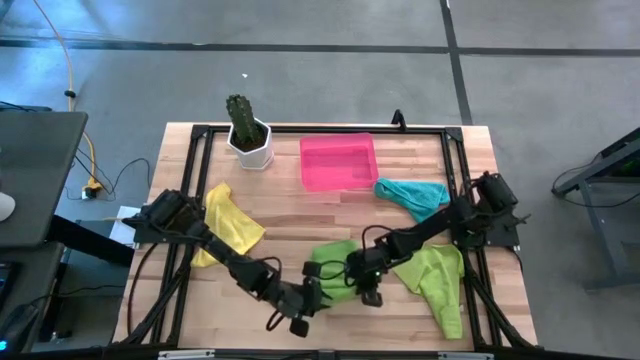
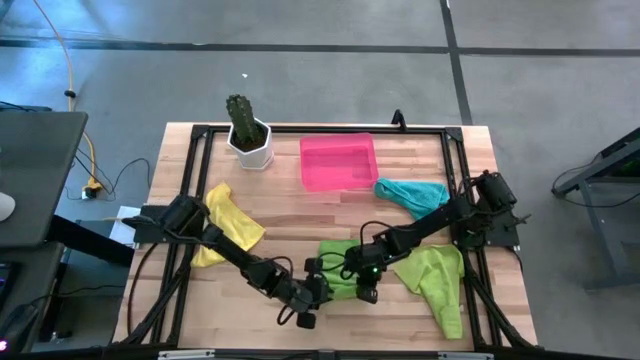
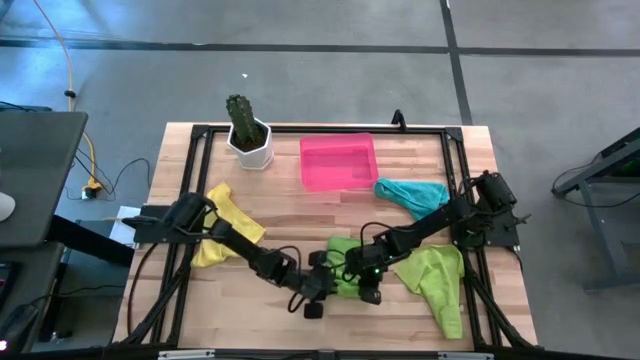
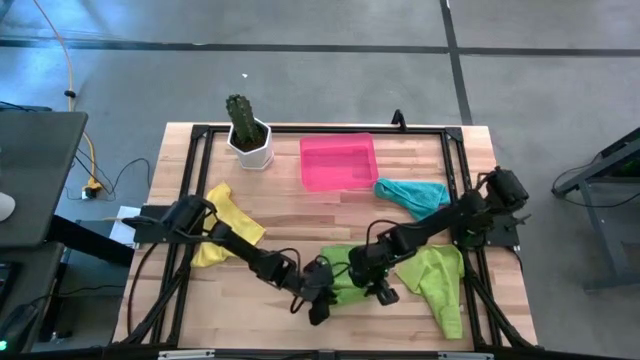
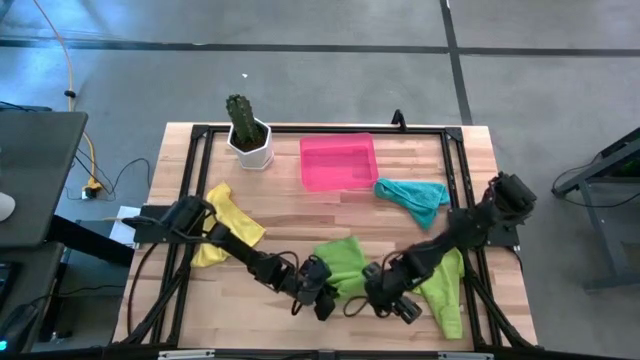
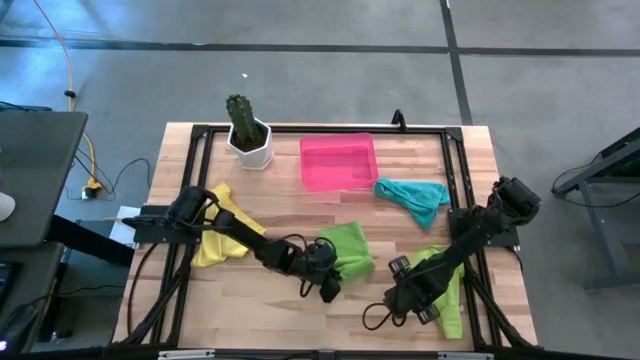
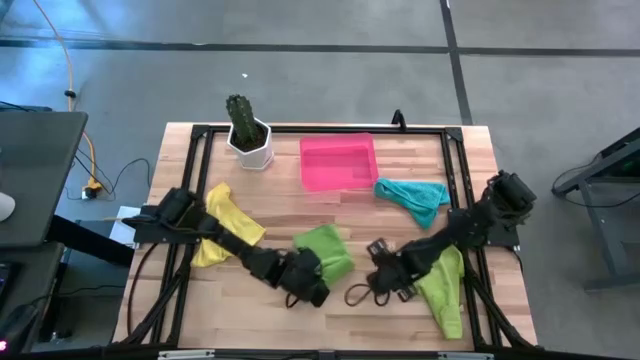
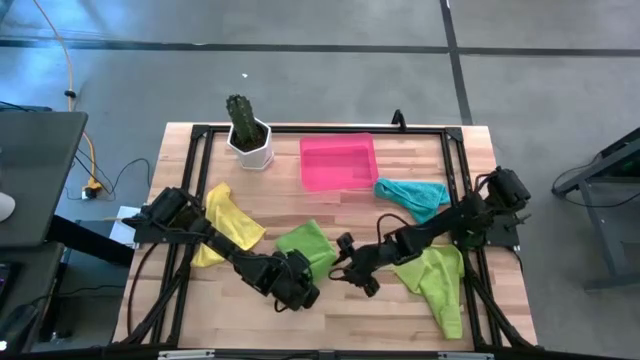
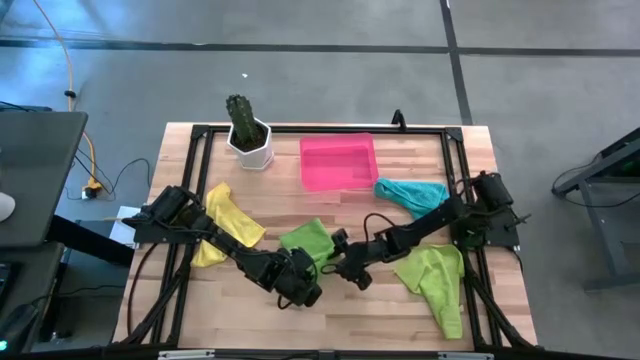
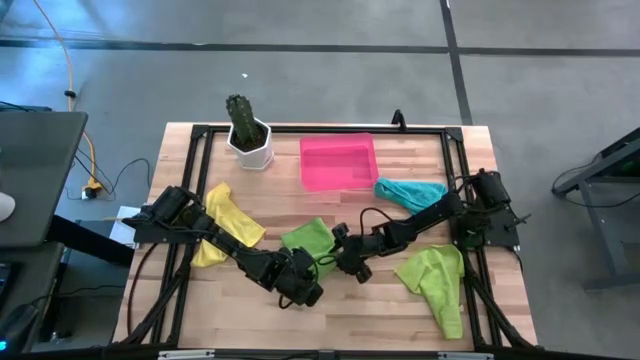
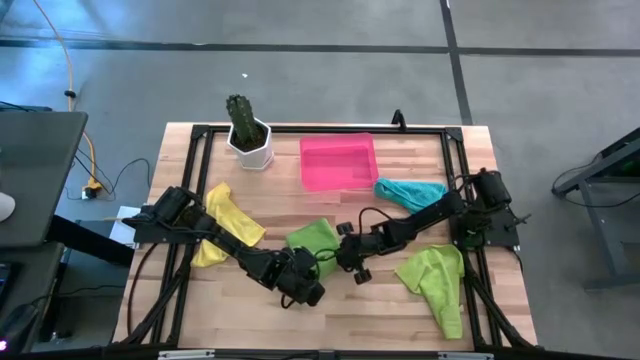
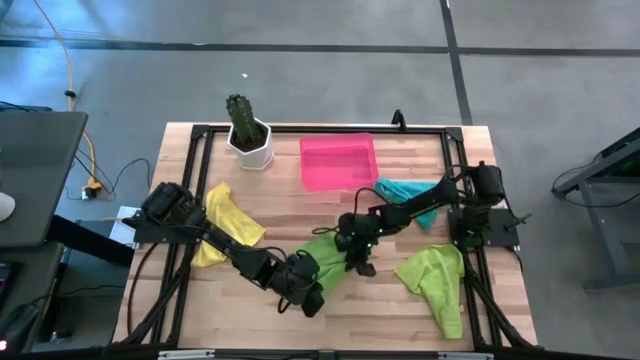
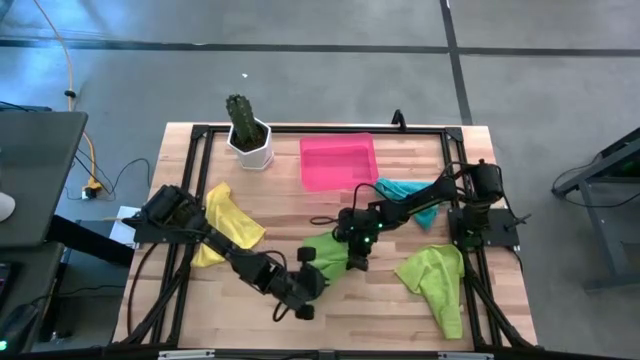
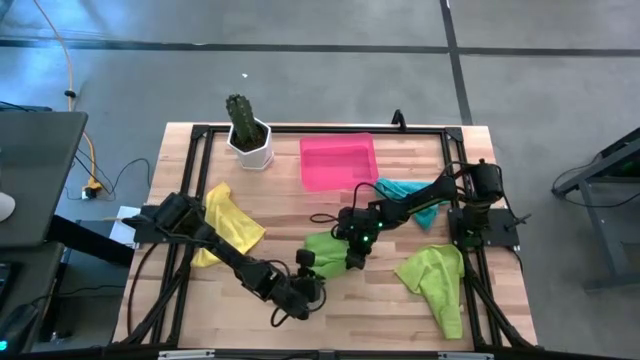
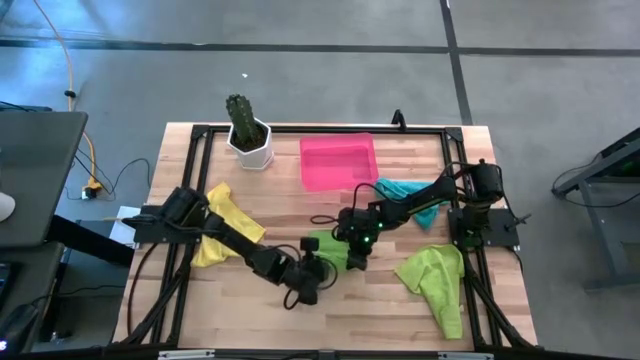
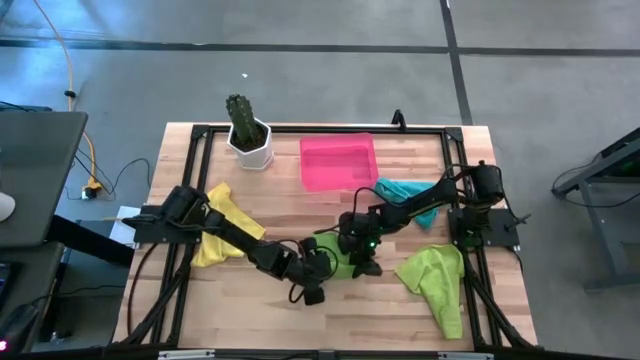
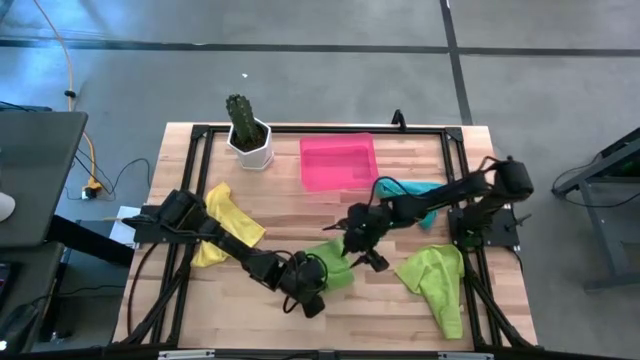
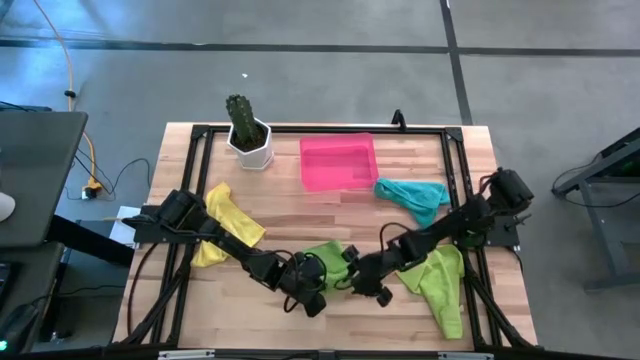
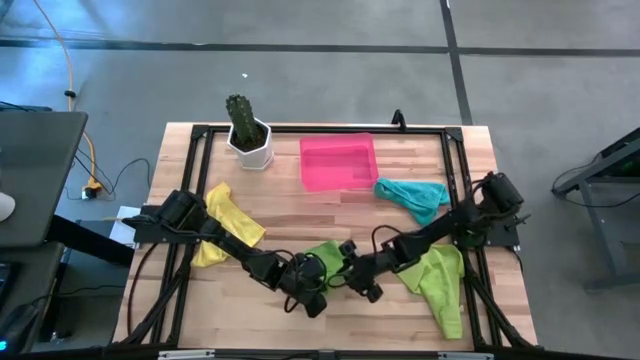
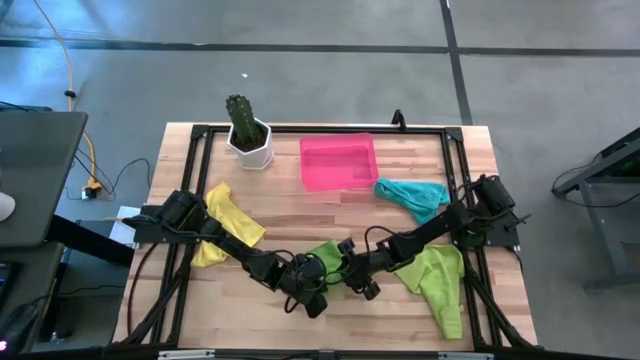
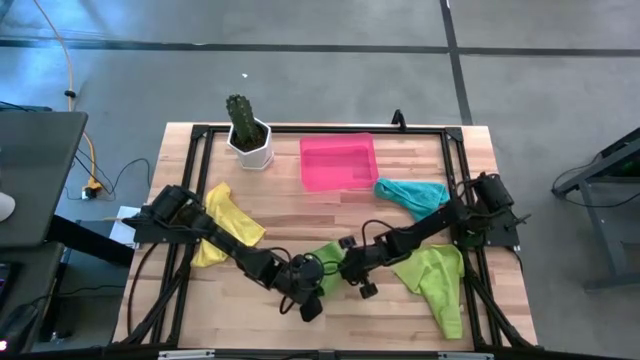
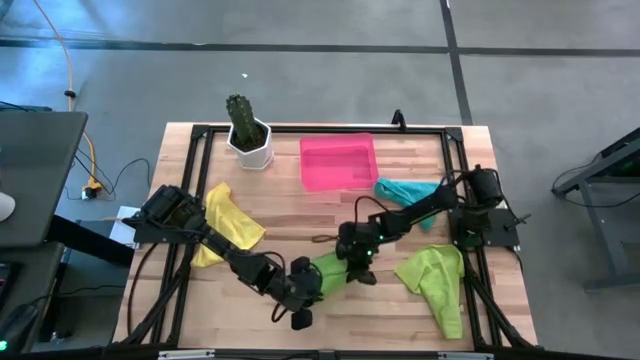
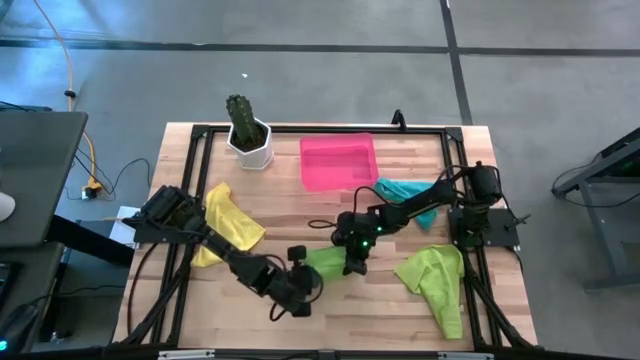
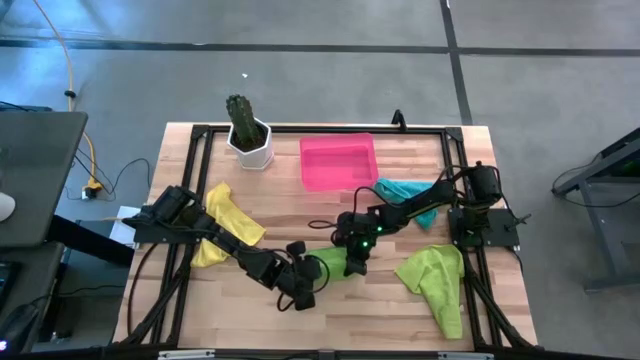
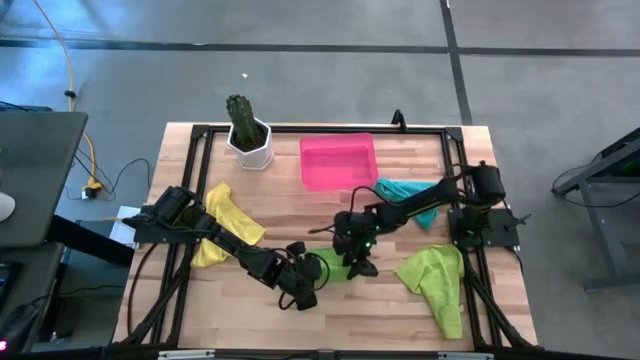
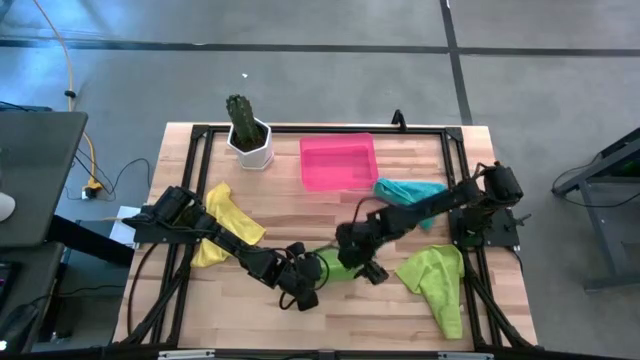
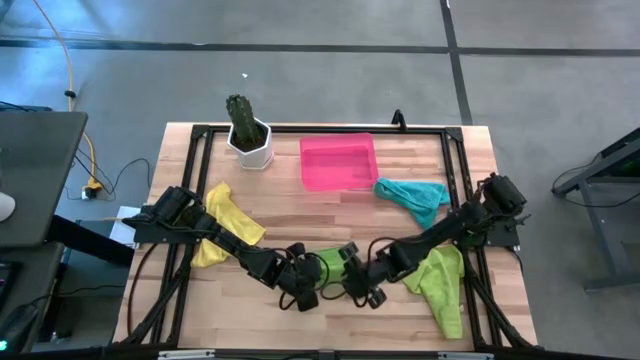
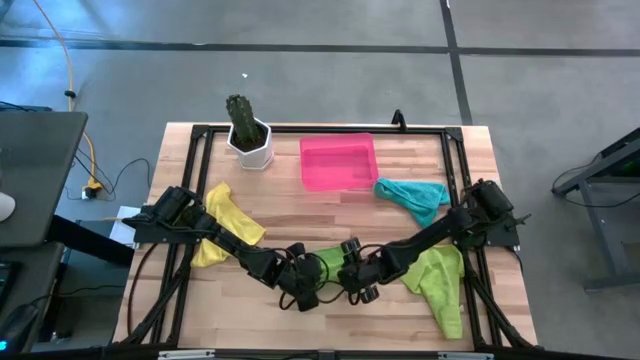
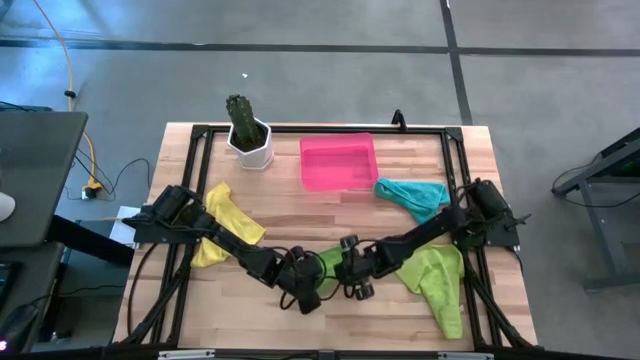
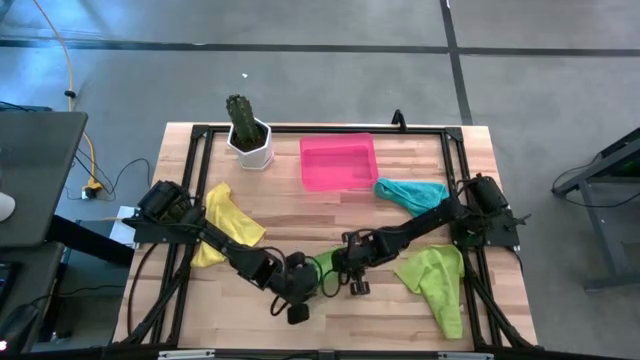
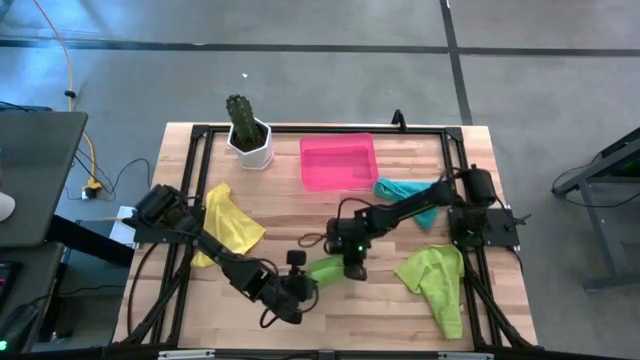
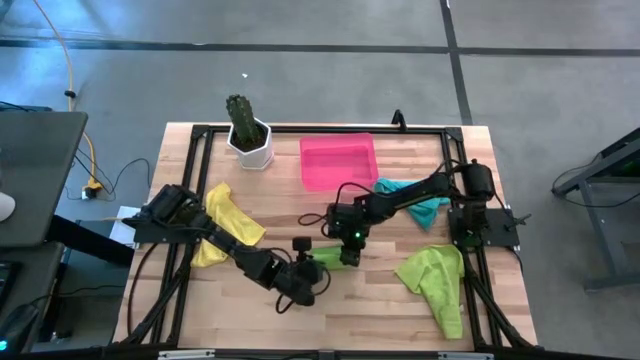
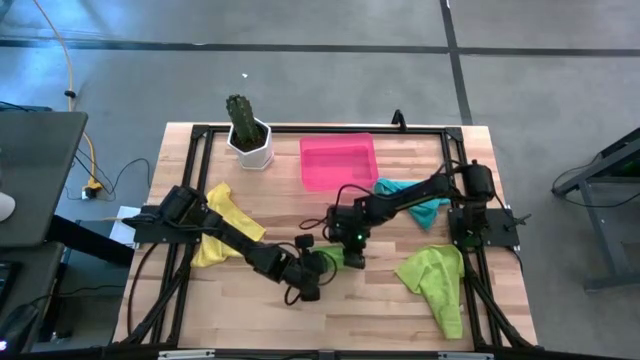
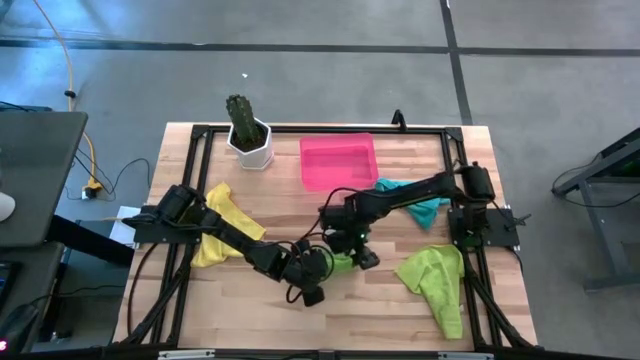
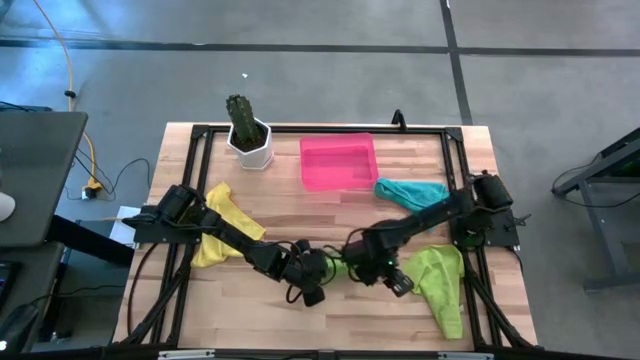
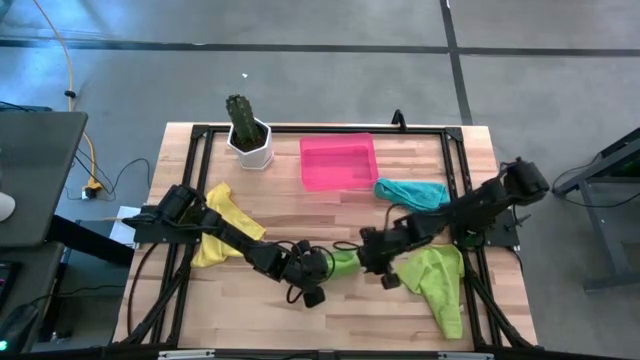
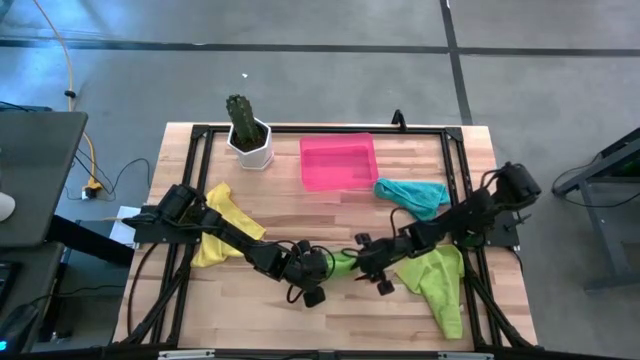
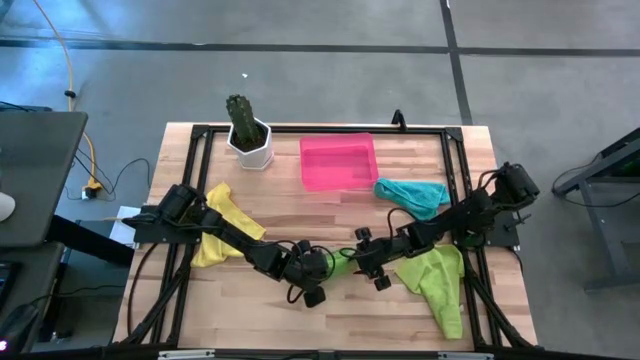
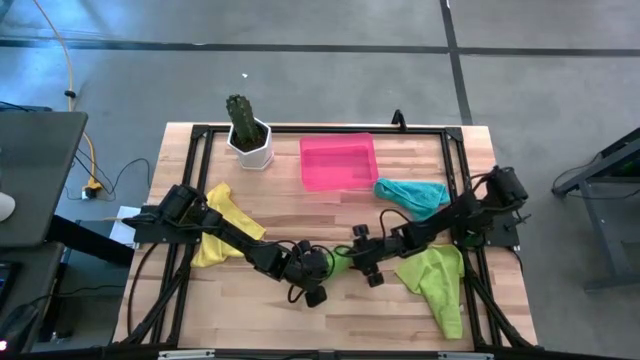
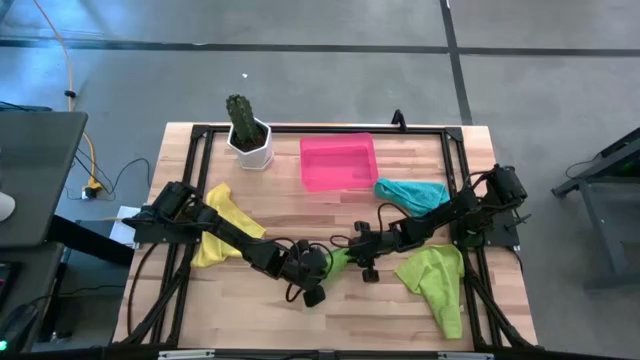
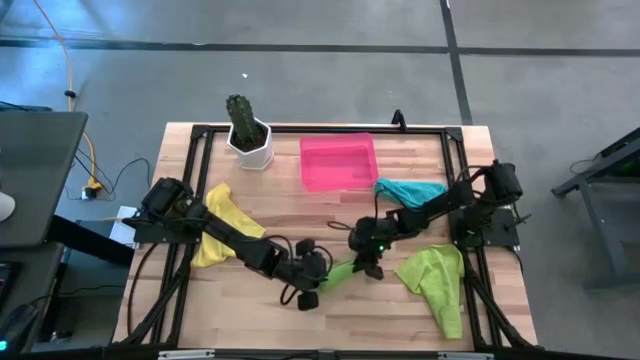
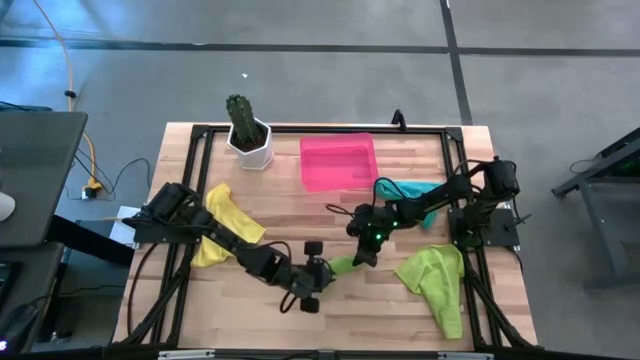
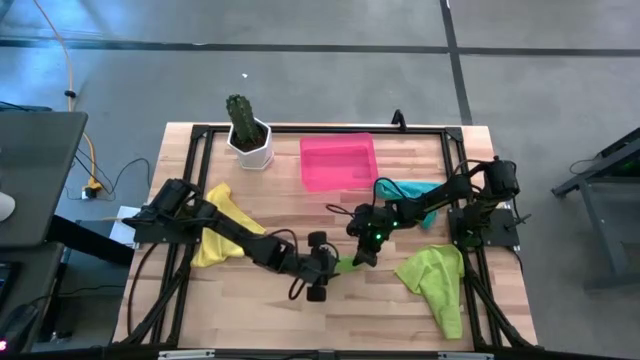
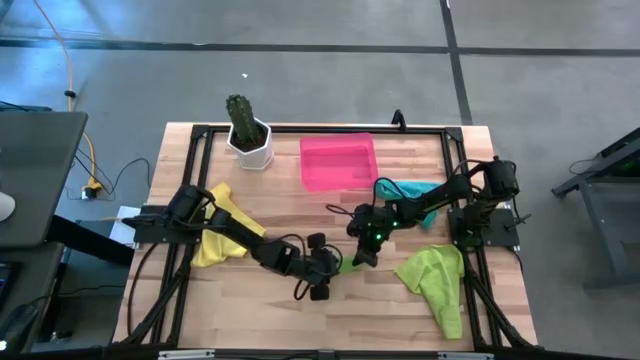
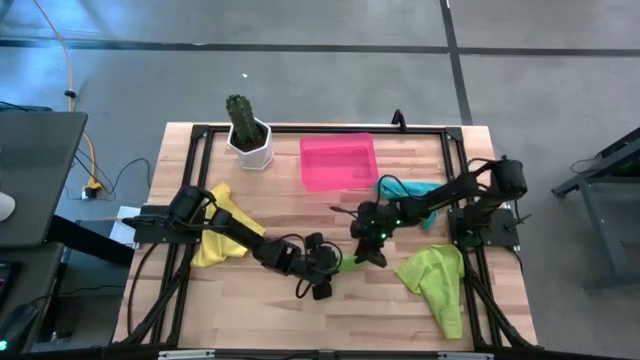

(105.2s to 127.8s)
Task: Roll microfiber towels into tight, uniform cylinder then place into a basket
Roll the green microfiber cloth
